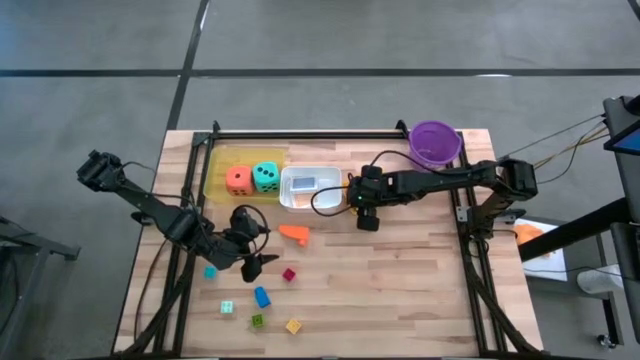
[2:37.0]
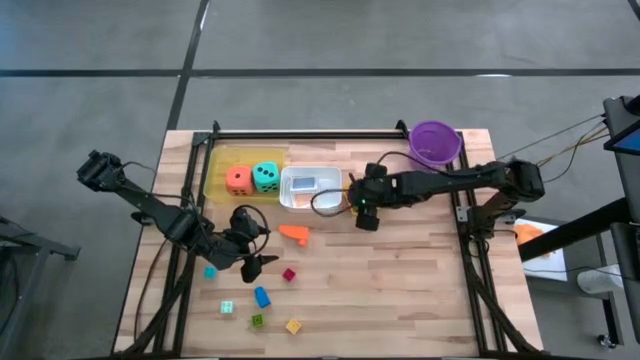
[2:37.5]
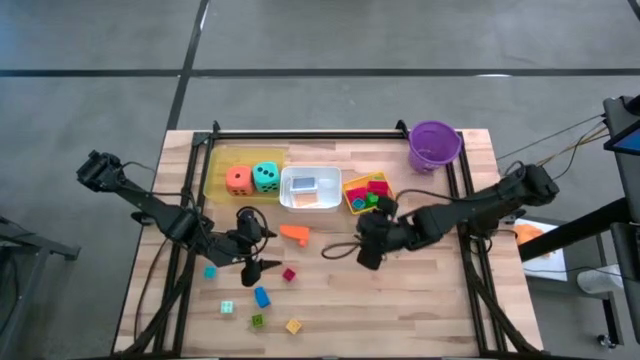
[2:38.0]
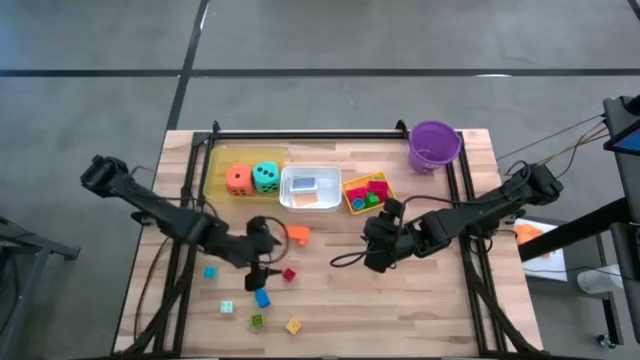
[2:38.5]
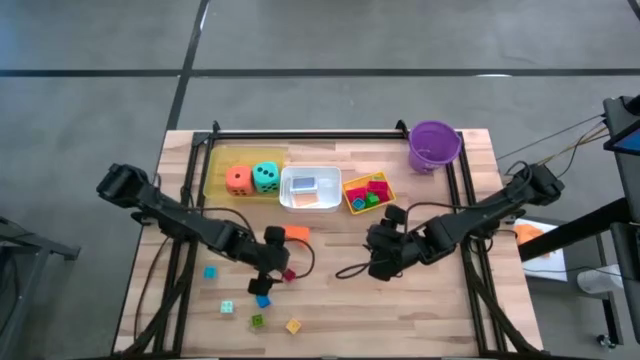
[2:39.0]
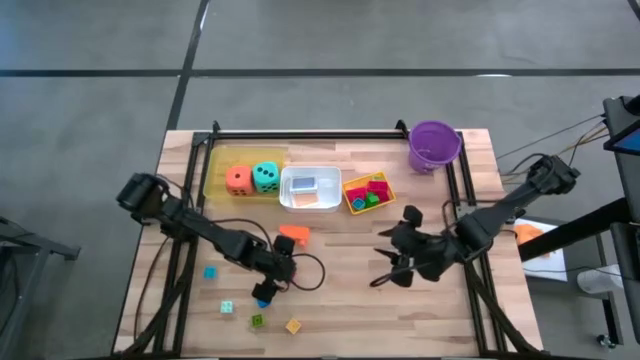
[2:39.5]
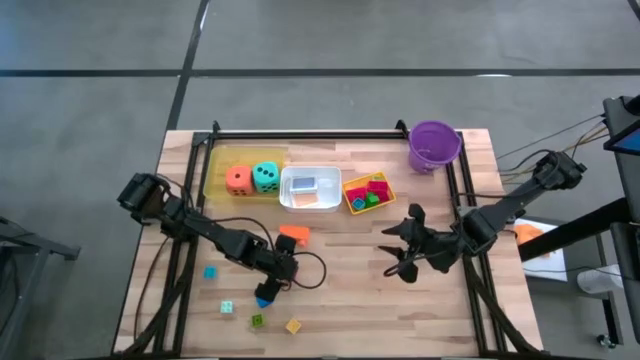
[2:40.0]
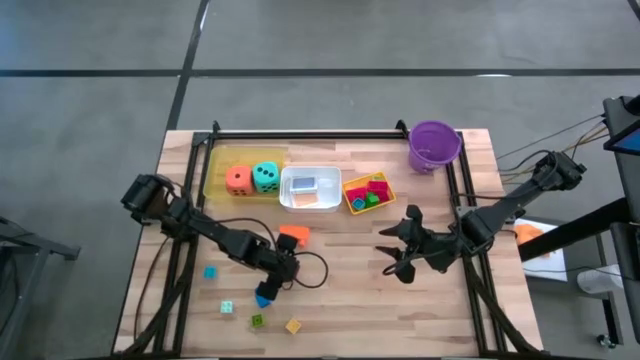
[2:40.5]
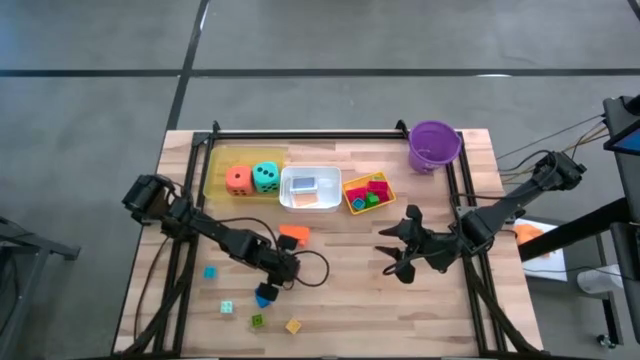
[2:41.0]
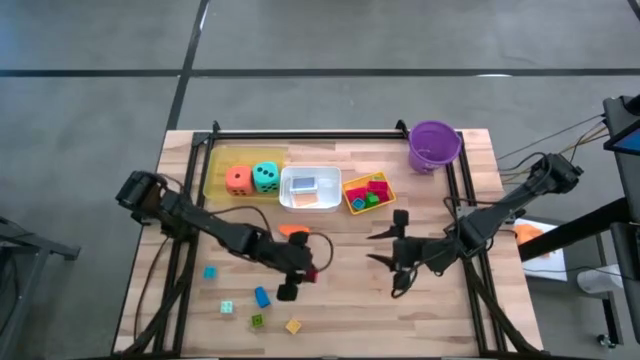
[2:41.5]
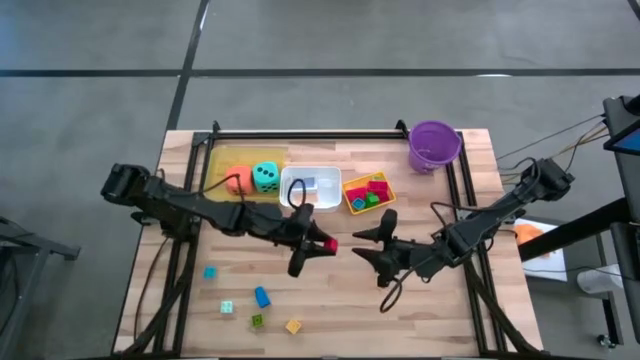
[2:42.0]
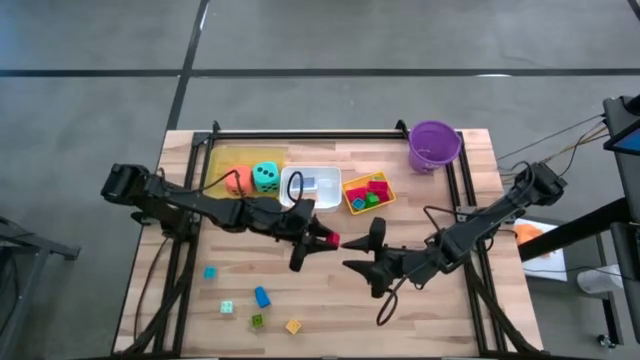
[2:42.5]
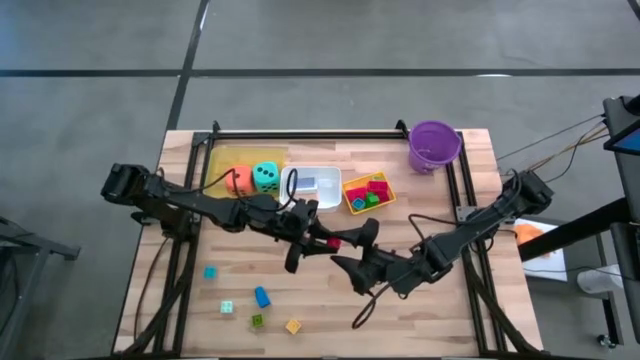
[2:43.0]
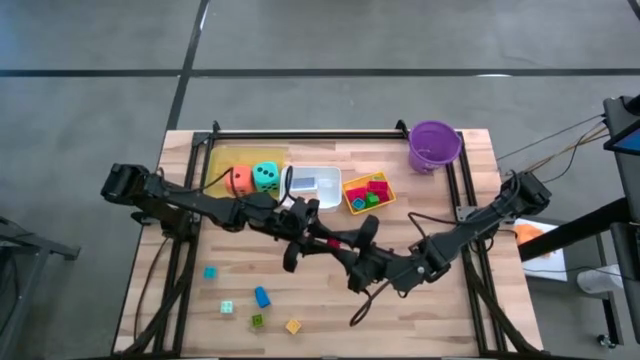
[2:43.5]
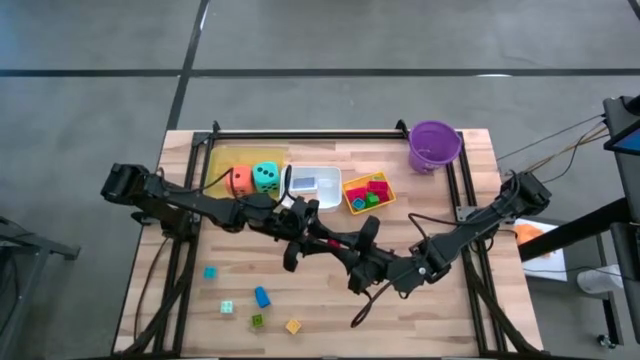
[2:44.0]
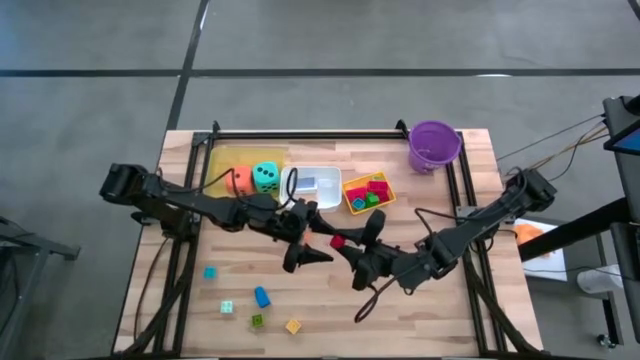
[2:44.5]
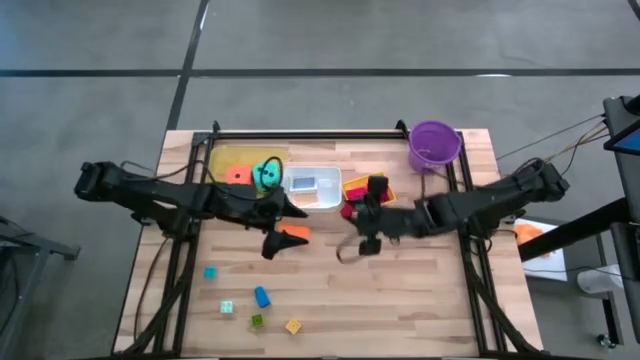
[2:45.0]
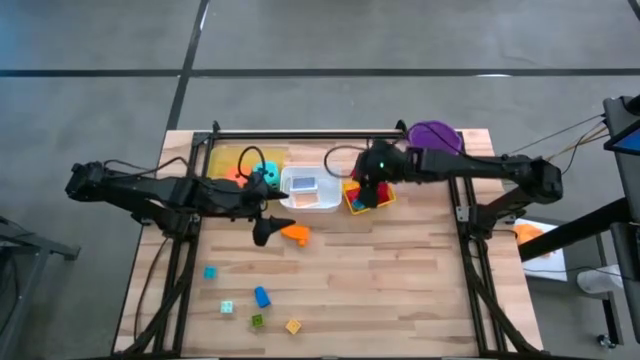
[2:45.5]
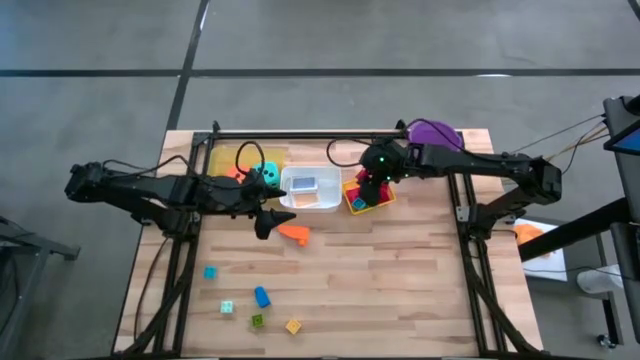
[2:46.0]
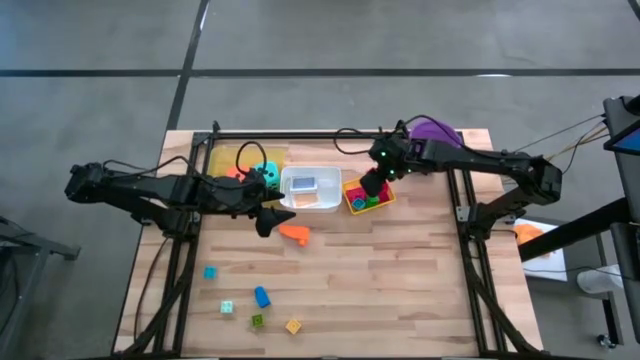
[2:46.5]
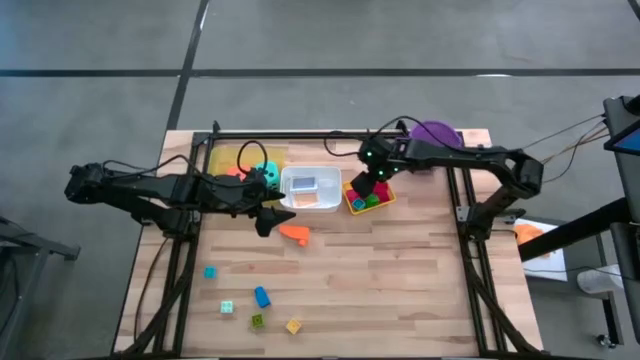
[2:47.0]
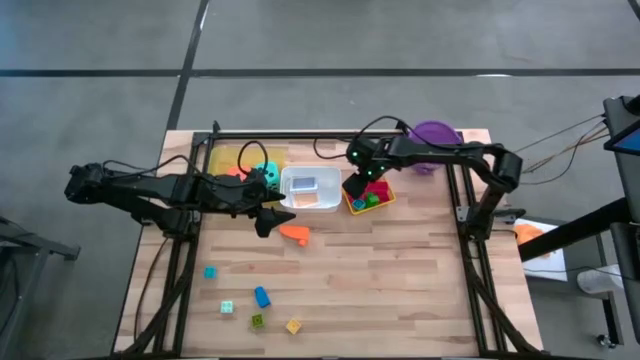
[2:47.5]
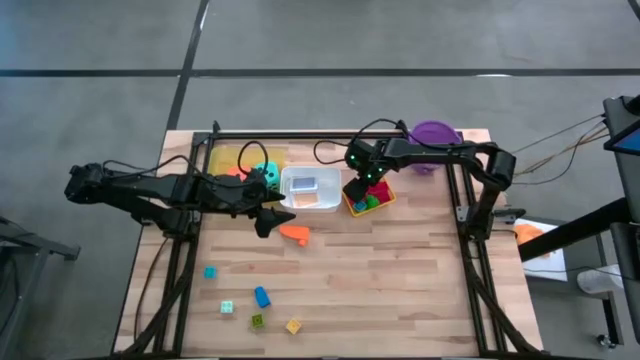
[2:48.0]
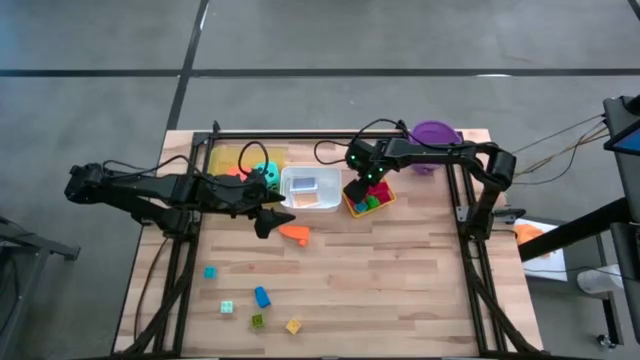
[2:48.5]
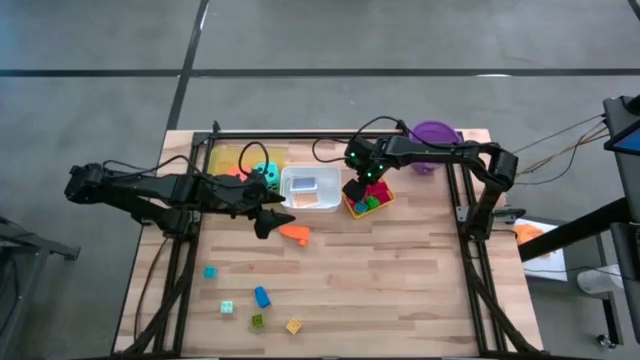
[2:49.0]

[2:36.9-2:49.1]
Task: Pick & Place Toys
Put the red game piece into the yellow bin

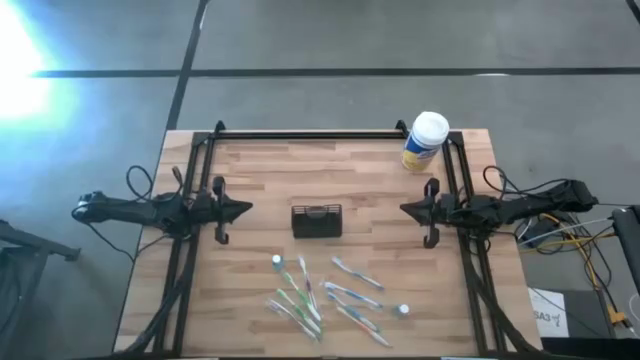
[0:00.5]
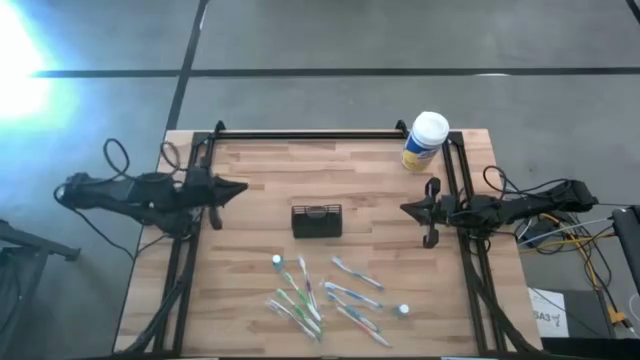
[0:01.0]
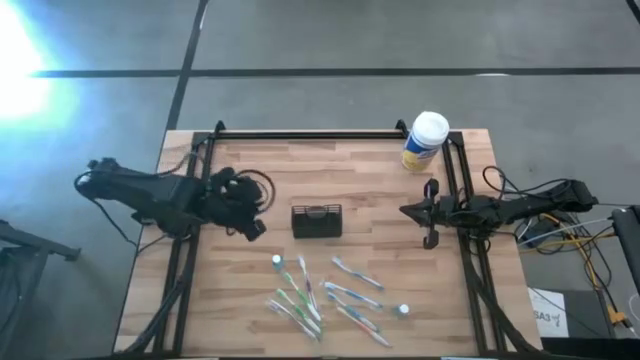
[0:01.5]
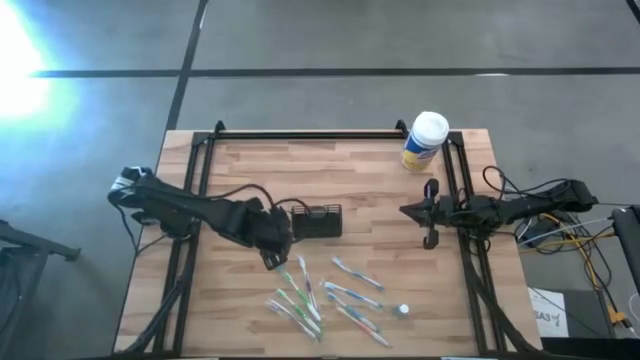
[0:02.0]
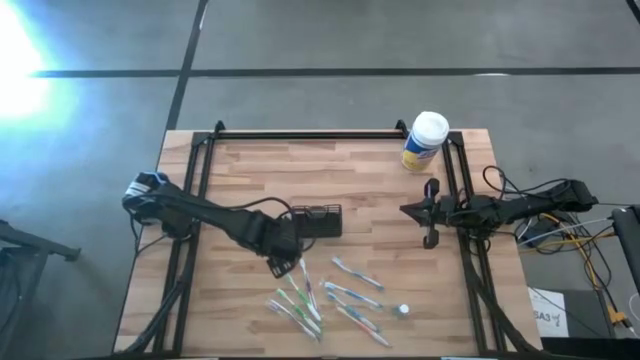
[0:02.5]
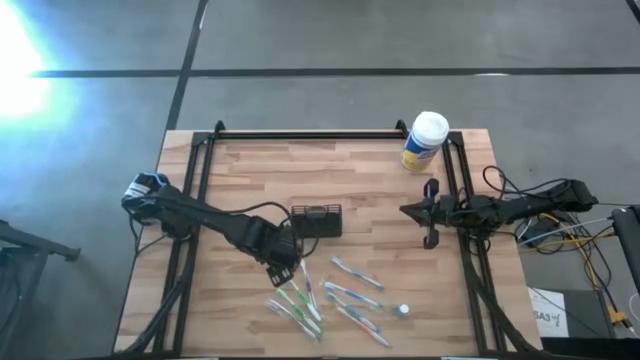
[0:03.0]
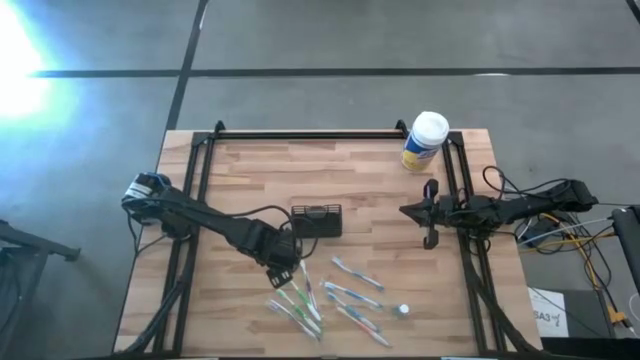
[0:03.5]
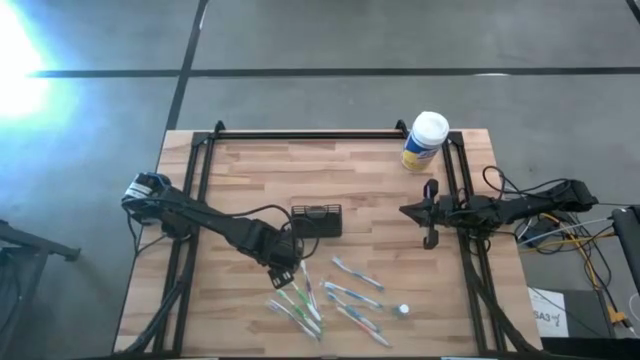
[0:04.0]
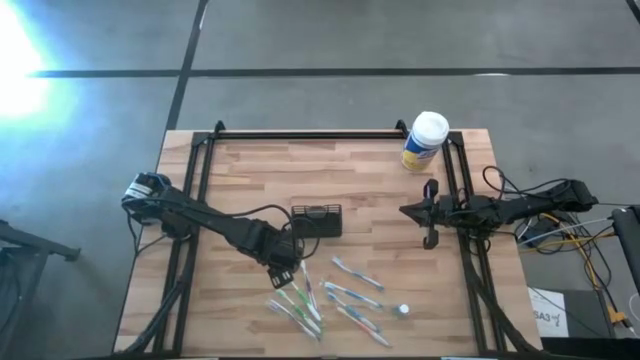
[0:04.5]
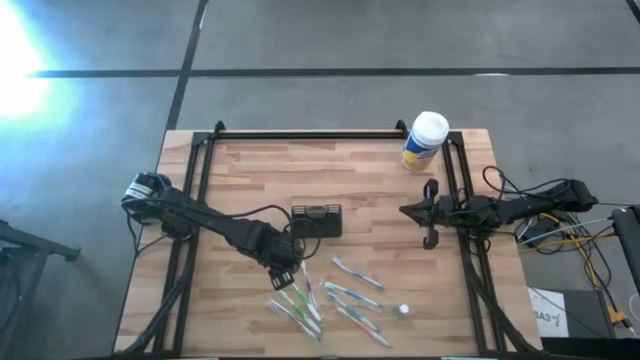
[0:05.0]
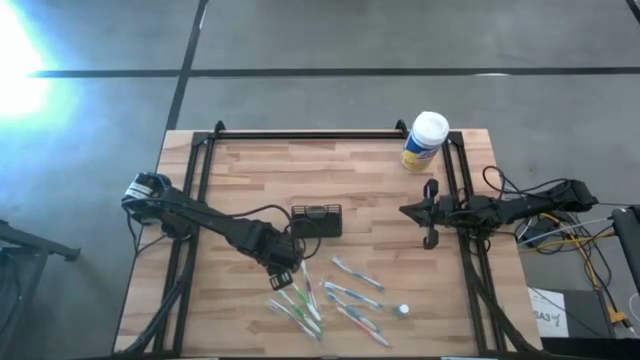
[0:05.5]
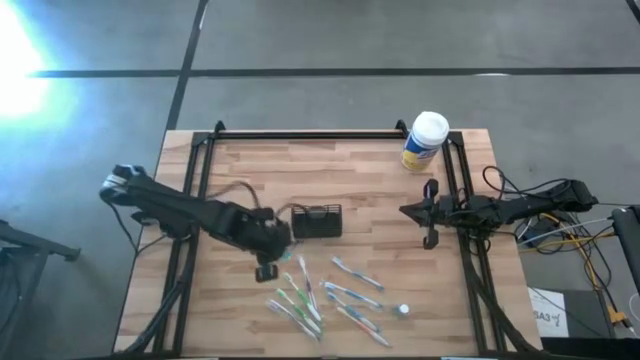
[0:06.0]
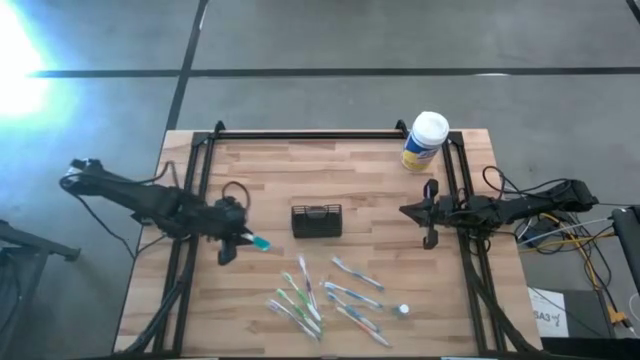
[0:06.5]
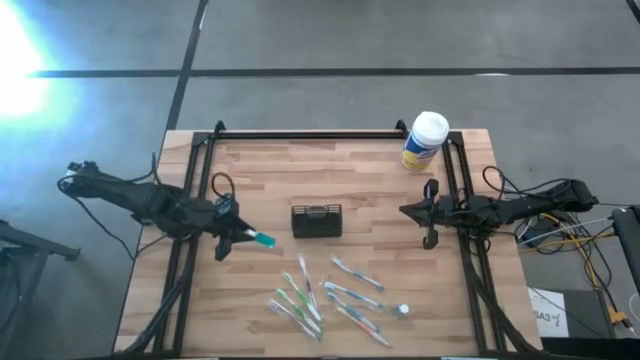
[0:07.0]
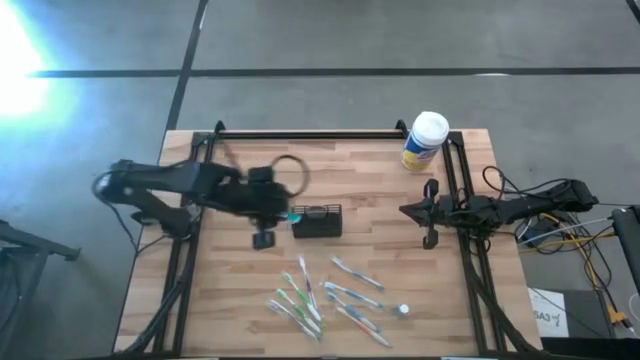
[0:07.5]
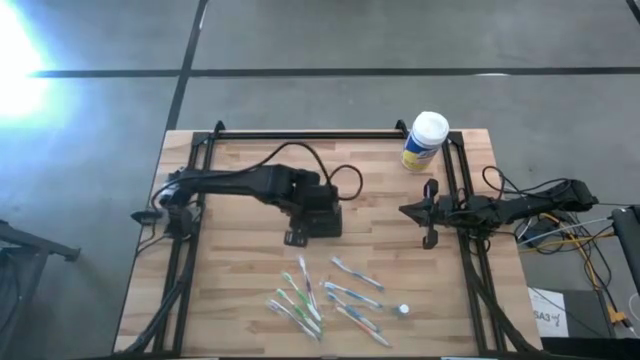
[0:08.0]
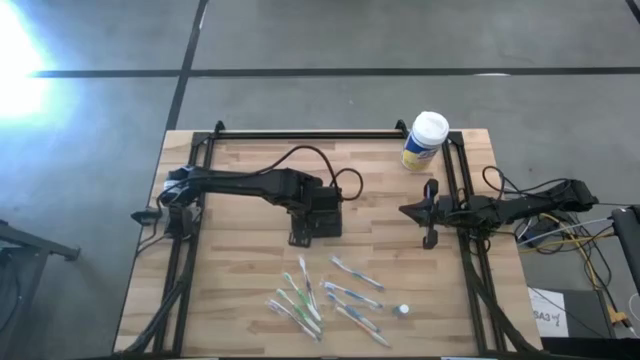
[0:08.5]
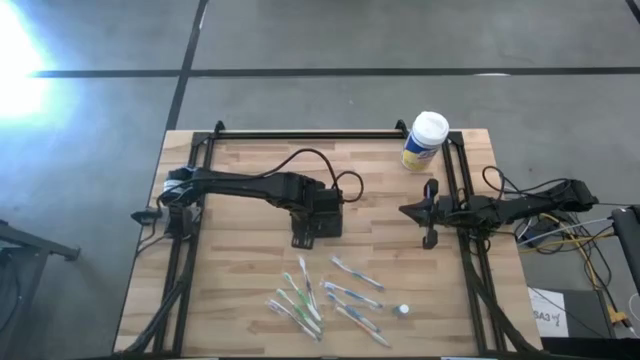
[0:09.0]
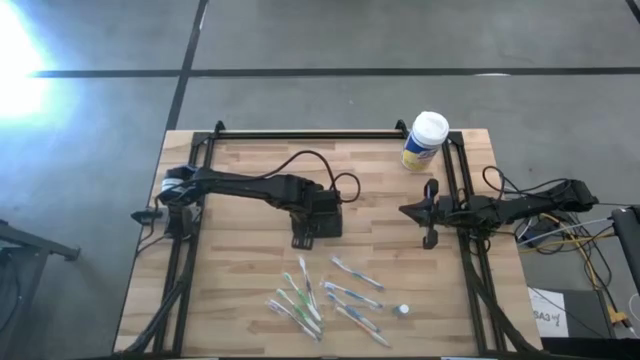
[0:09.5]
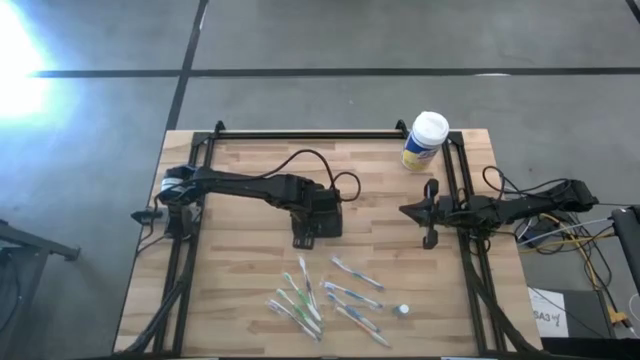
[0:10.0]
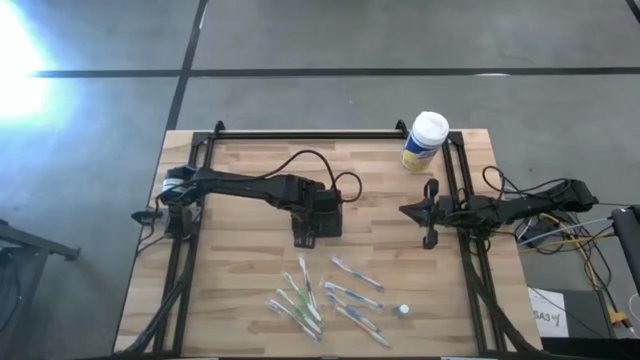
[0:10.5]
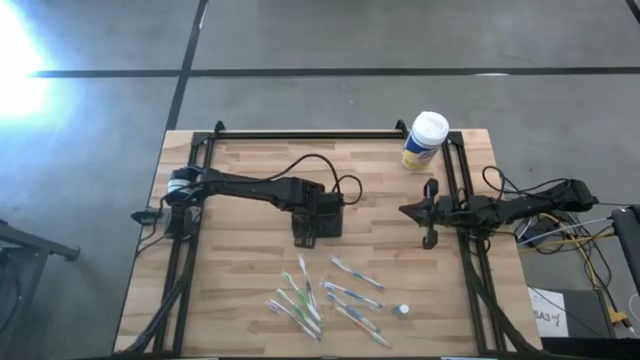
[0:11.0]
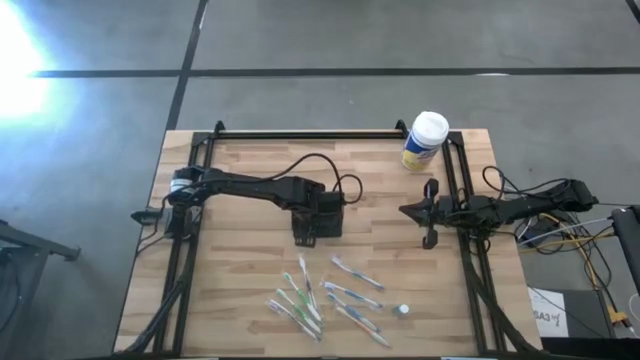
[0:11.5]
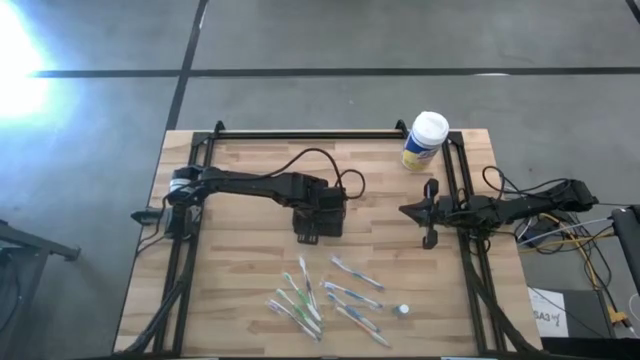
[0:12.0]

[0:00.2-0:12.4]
Task: Pick & Place toothbrushing station
Put the left blue mouthwash into the black mesh organizer
